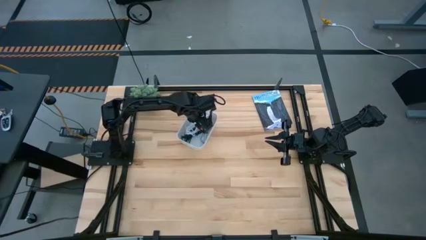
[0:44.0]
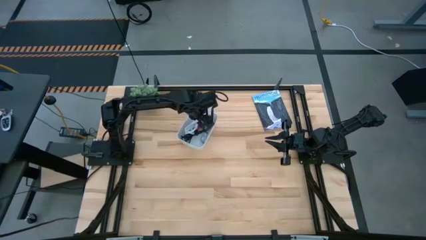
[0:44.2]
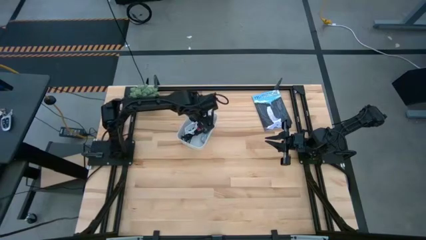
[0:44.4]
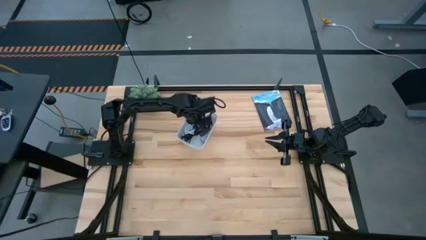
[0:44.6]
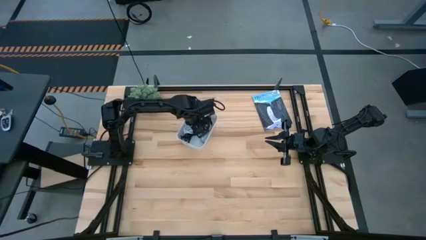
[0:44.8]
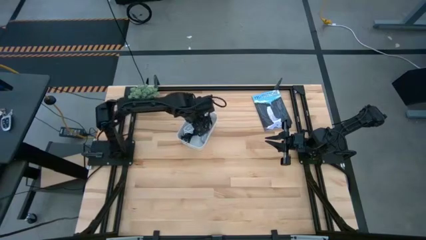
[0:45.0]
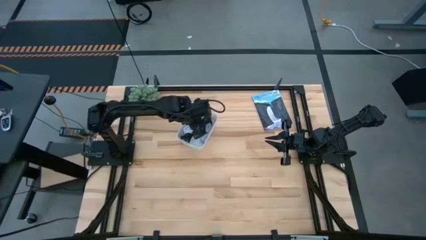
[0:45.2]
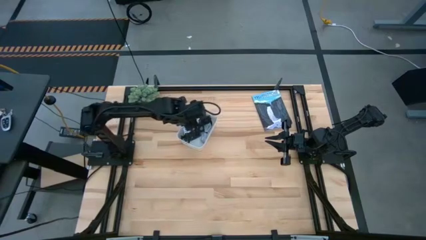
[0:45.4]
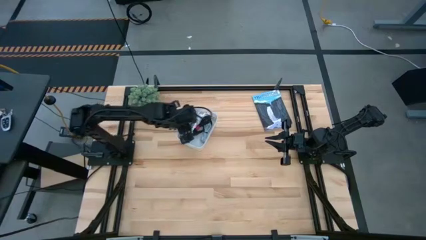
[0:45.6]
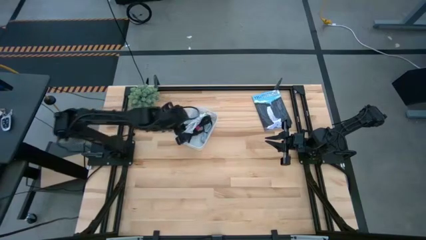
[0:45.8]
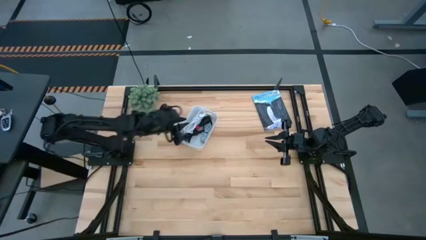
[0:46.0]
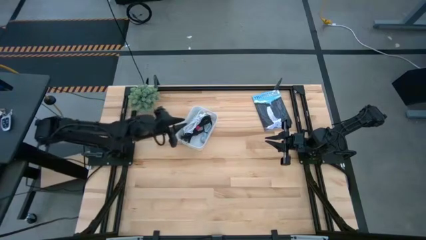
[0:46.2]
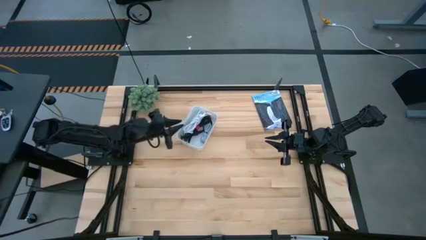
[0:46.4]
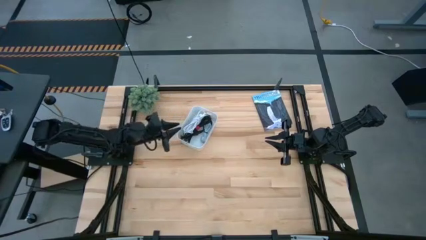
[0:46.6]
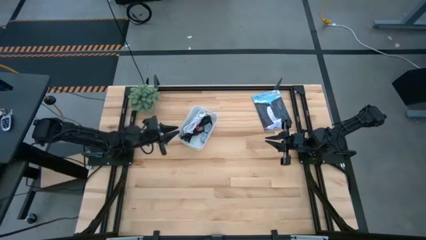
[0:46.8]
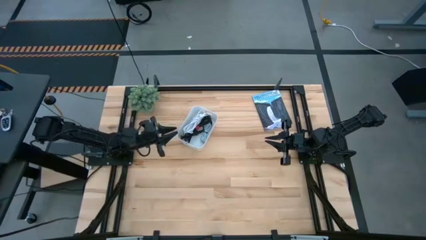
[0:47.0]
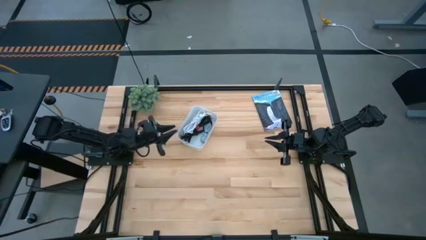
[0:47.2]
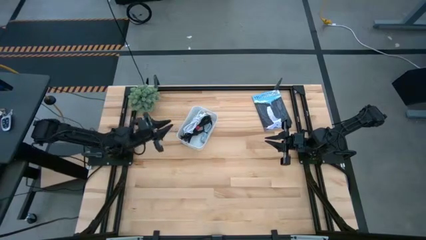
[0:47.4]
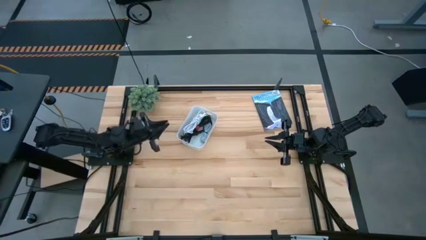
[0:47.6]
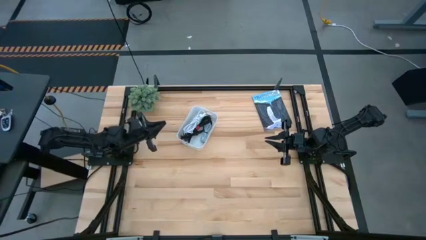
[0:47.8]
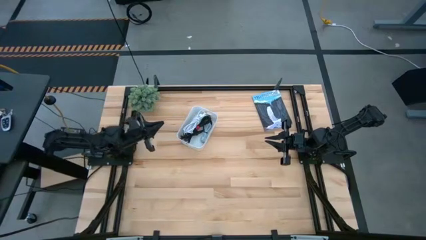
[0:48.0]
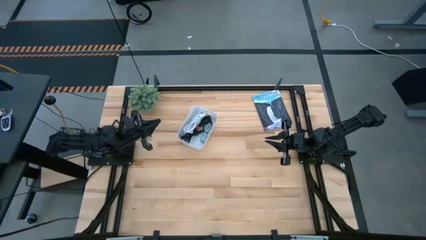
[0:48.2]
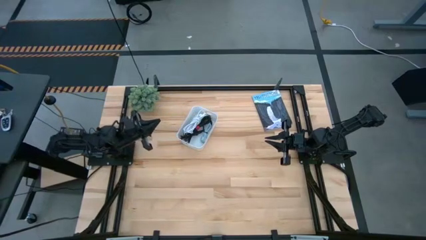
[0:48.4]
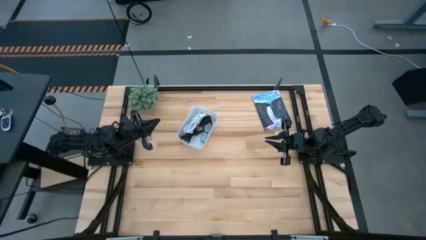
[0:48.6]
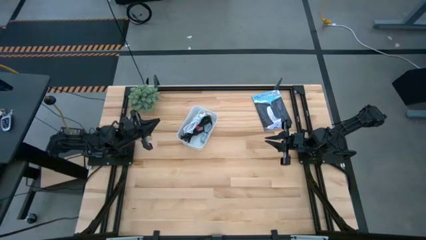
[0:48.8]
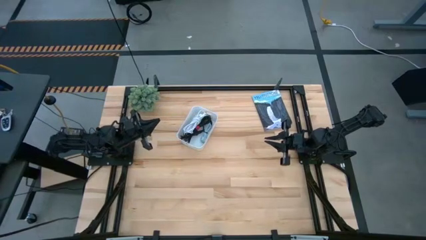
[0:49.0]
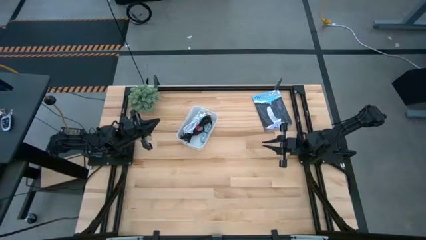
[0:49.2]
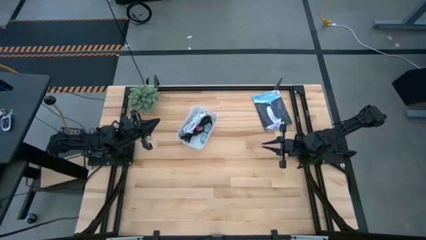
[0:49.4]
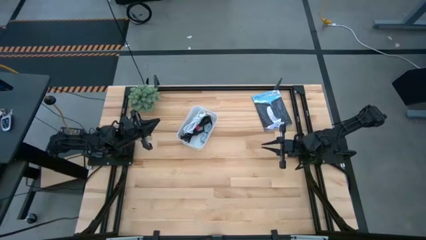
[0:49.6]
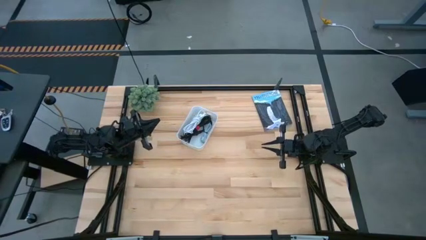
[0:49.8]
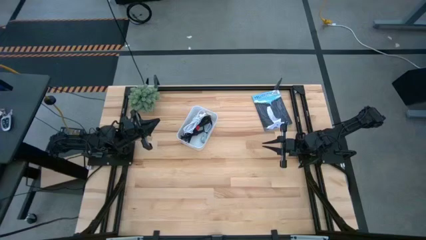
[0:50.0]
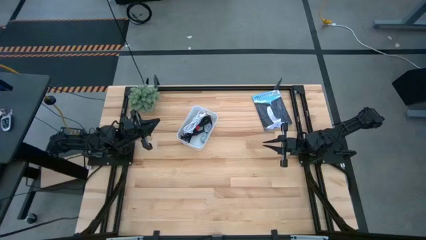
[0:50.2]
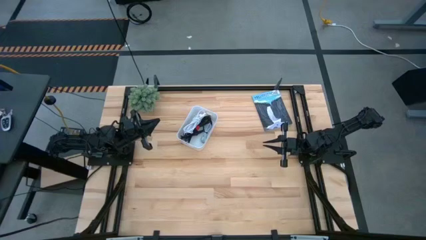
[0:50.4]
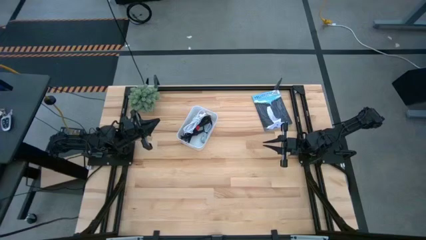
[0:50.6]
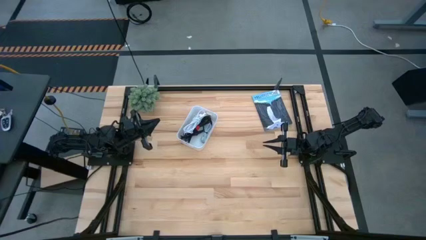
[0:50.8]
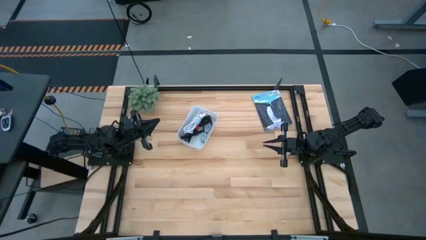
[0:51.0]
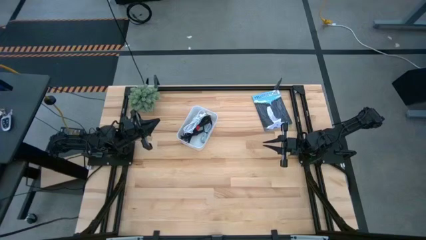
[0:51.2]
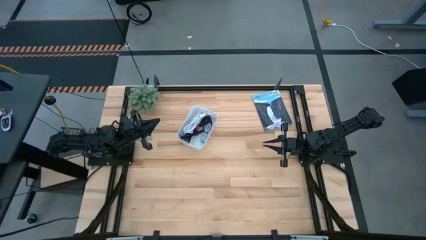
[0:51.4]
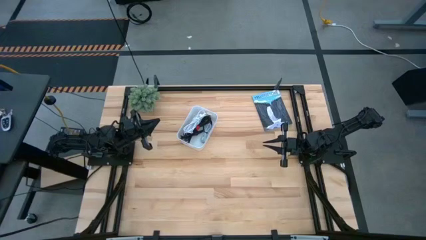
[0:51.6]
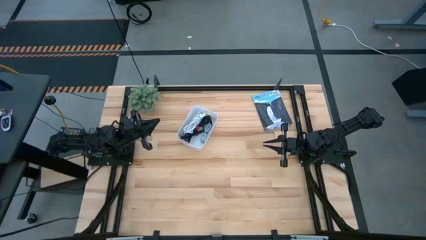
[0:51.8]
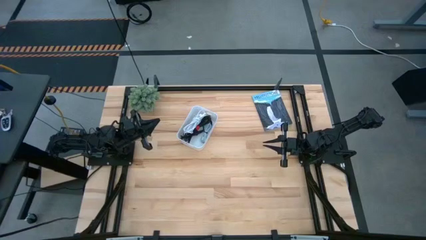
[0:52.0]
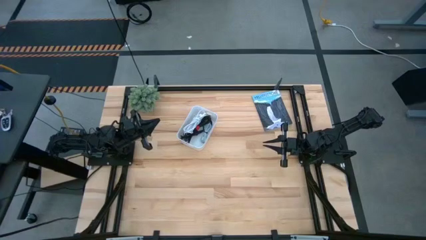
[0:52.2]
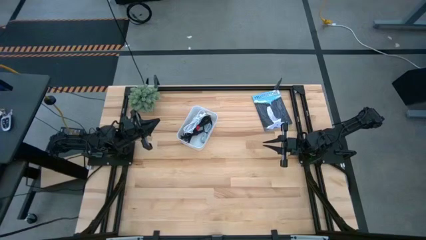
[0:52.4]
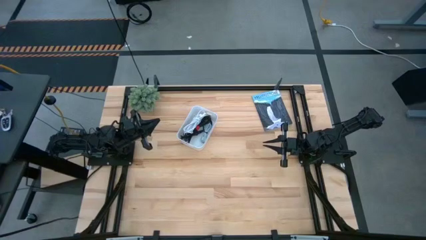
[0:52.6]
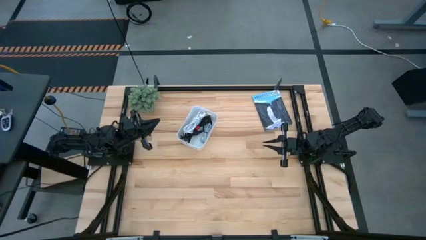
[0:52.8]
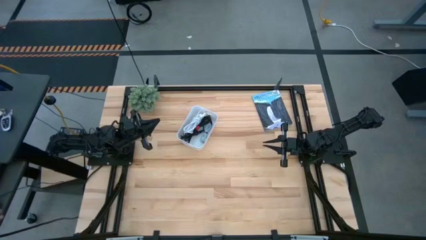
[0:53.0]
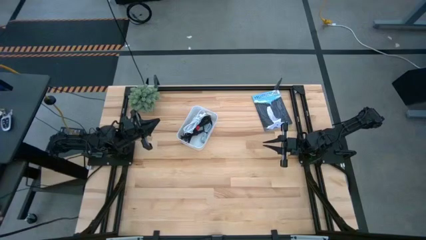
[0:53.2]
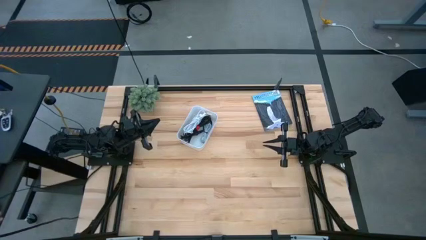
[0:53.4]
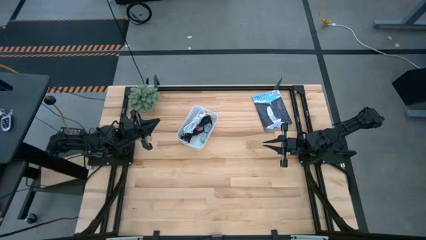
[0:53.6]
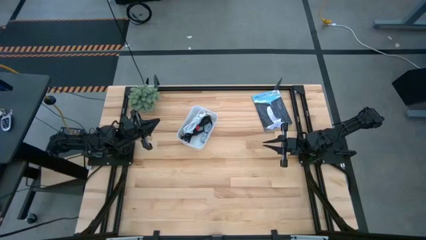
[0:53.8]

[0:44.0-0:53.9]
Task: Pick and place USB-C Cables
Return to Home Position

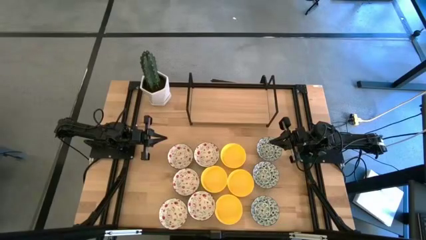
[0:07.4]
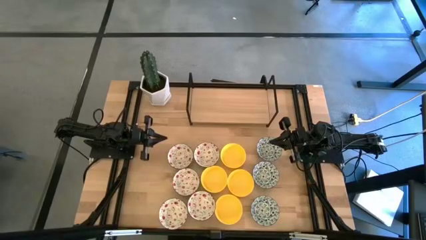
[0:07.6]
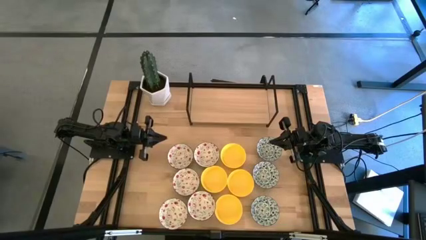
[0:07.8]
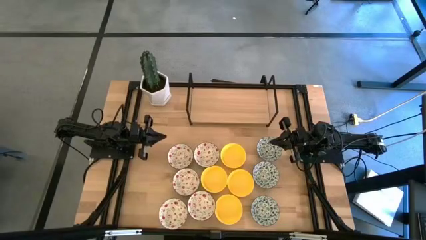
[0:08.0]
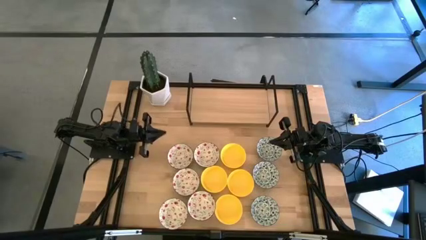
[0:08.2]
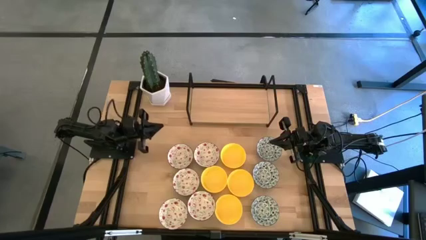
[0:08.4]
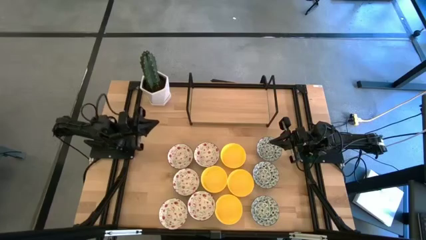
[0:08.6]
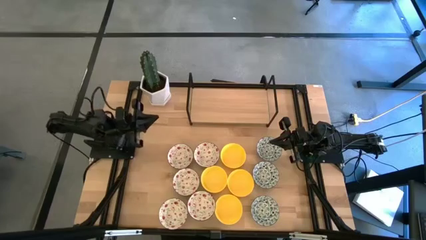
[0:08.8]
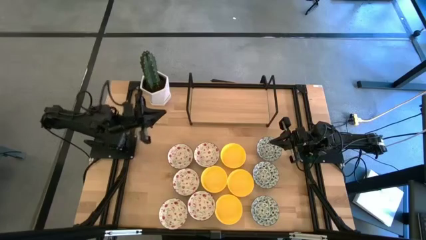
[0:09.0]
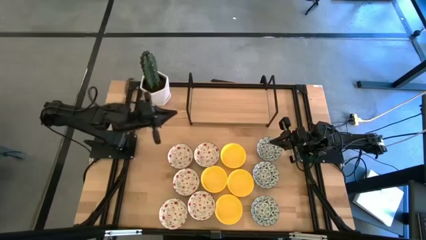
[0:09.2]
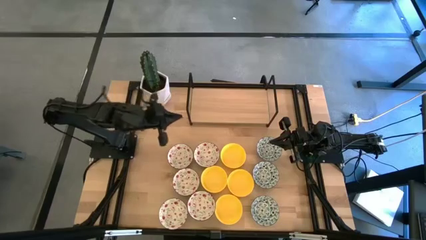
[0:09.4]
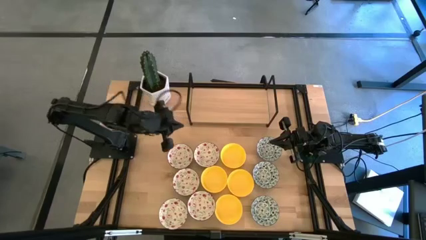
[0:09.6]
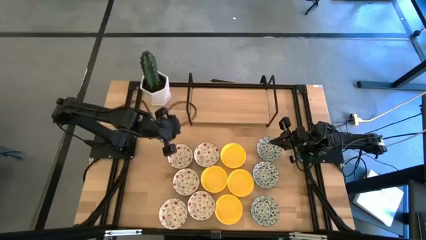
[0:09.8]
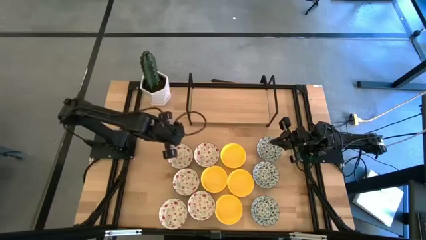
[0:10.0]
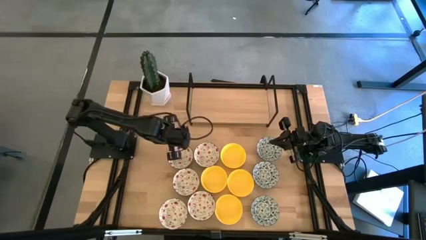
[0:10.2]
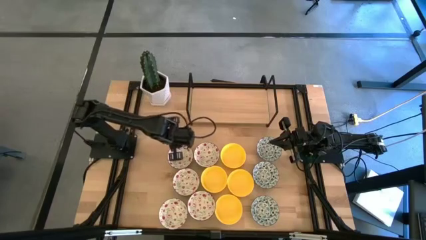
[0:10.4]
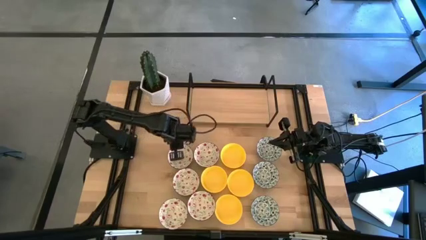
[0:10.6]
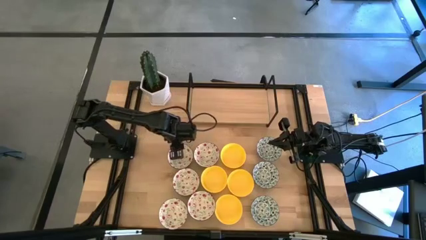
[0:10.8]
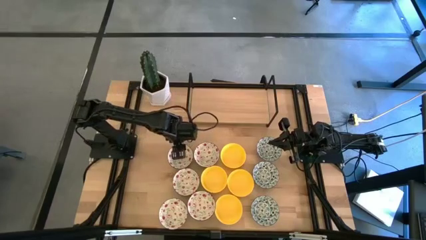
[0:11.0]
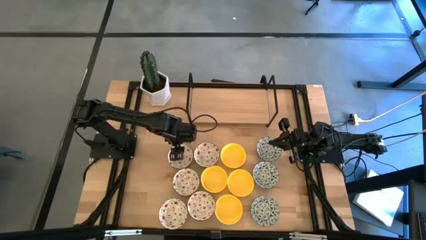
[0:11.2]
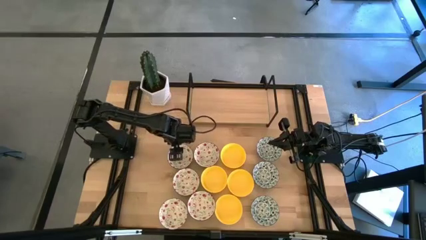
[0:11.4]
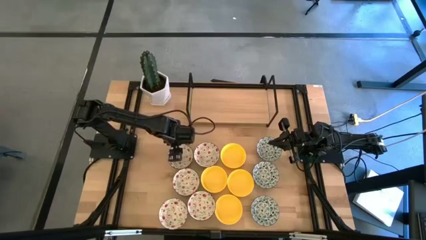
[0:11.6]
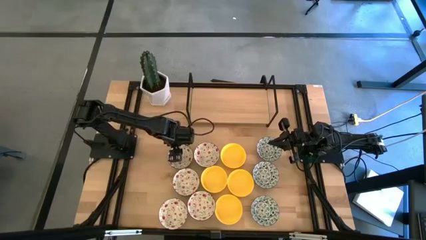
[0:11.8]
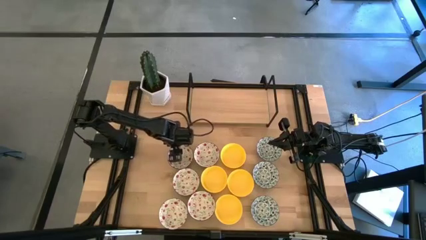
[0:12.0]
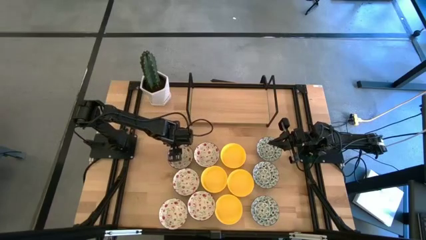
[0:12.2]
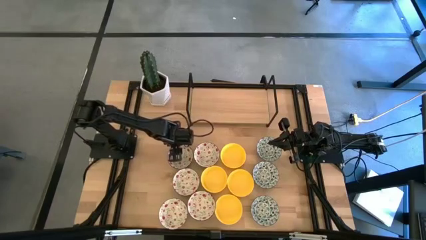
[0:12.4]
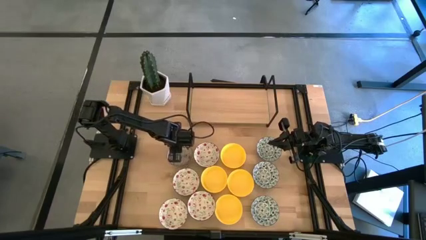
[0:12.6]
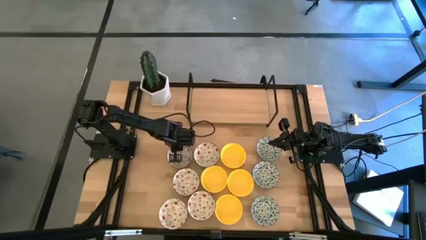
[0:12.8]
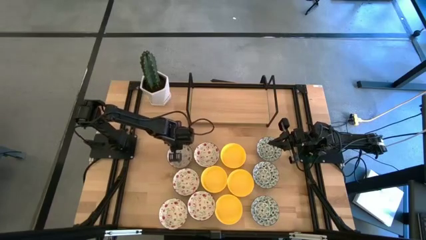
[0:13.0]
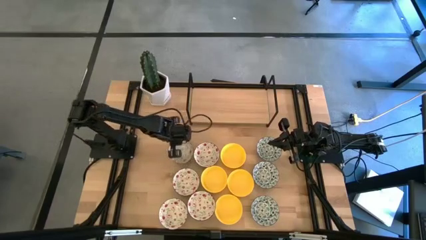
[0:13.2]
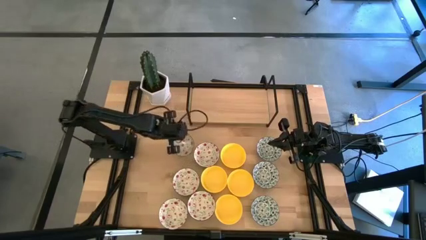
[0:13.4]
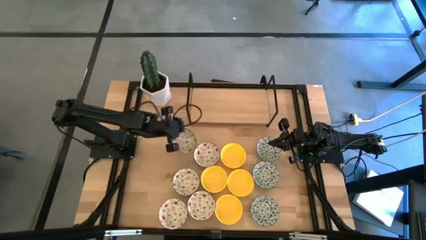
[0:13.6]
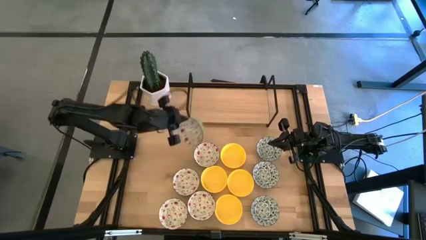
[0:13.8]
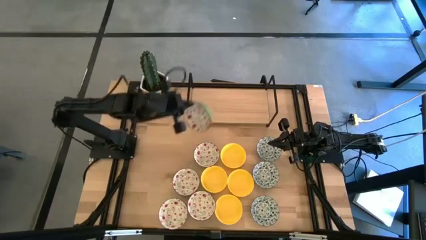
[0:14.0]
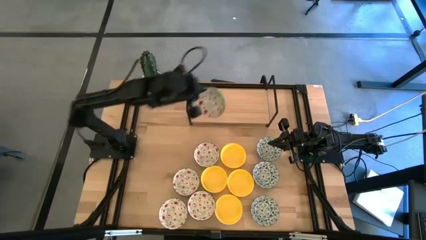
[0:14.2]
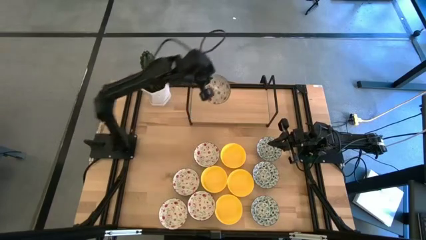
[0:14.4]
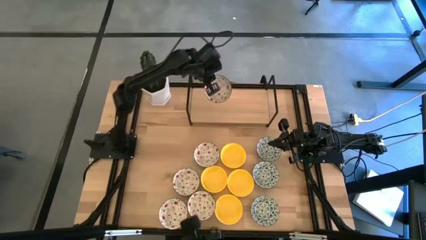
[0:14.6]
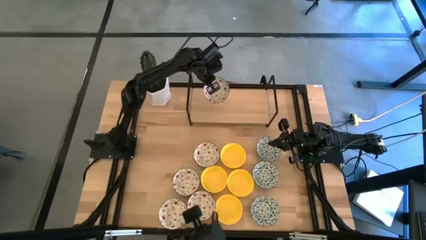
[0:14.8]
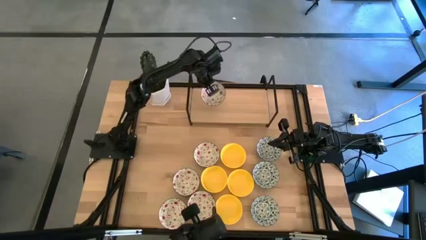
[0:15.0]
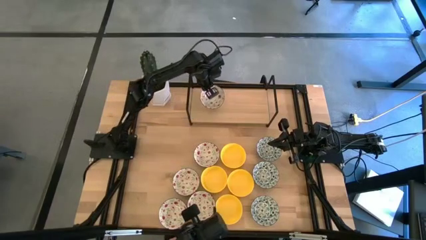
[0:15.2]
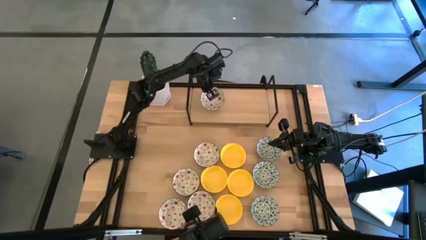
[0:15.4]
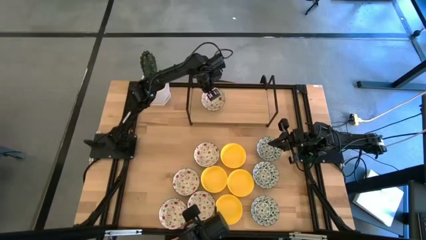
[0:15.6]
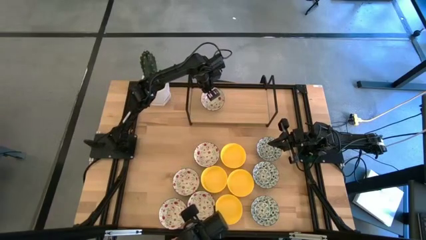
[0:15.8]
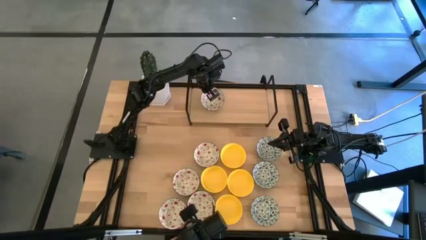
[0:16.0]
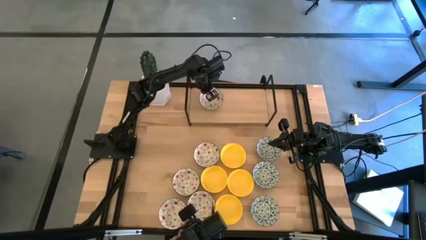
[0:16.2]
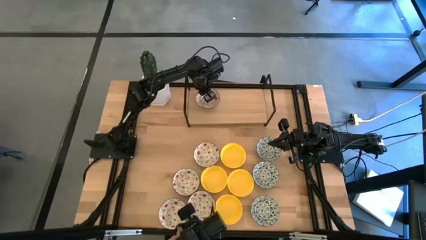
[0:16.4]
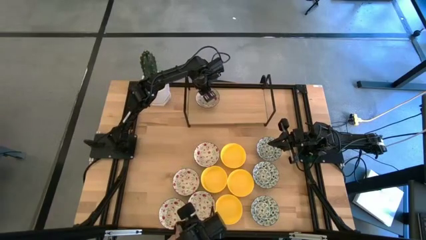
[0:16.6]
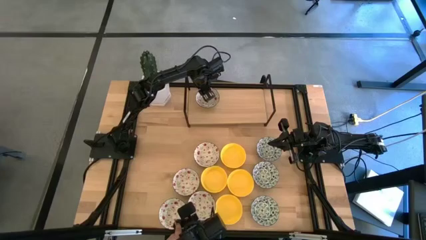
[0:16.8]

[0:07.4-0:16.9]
Task: Pick & Place Mini bowls
Put the white bowl on the shelf
